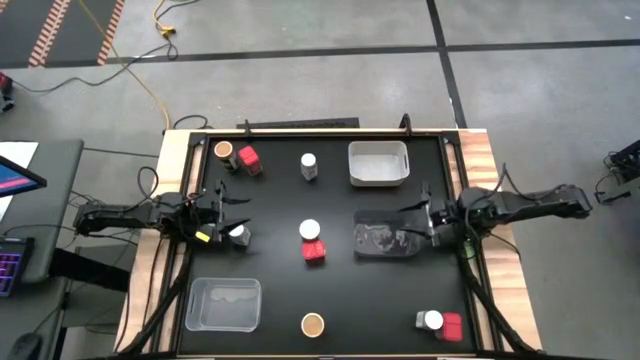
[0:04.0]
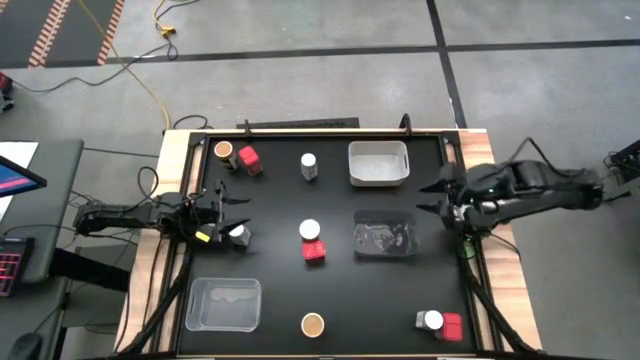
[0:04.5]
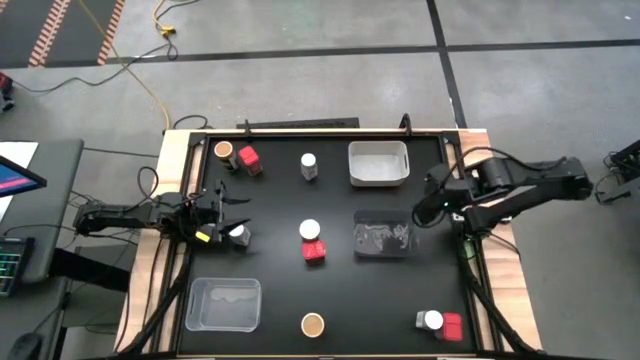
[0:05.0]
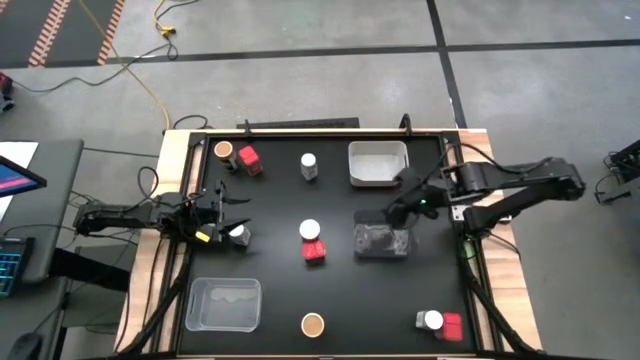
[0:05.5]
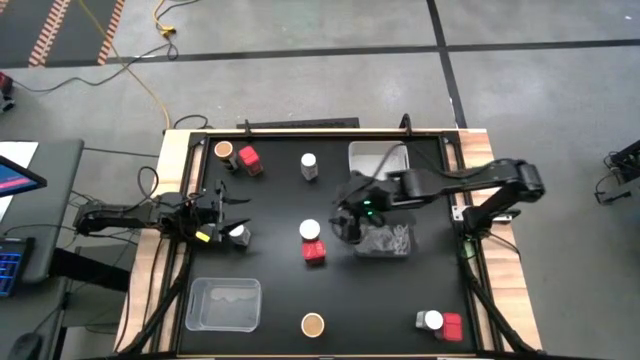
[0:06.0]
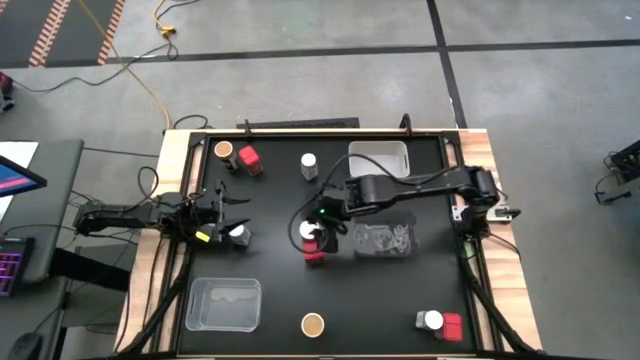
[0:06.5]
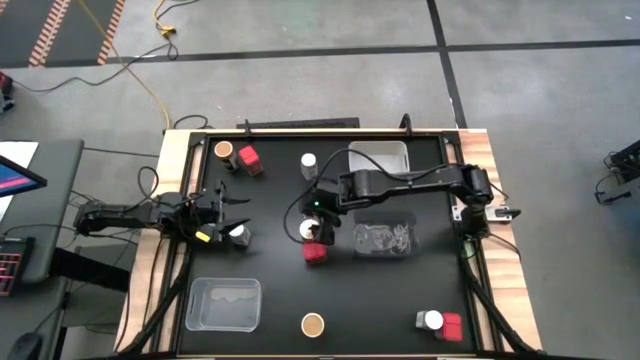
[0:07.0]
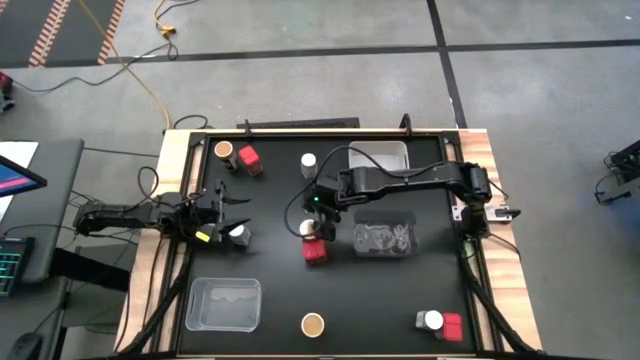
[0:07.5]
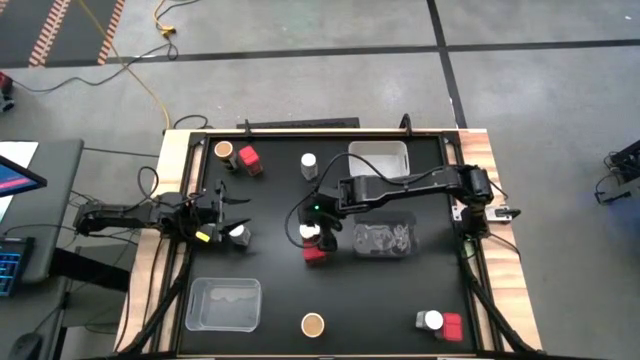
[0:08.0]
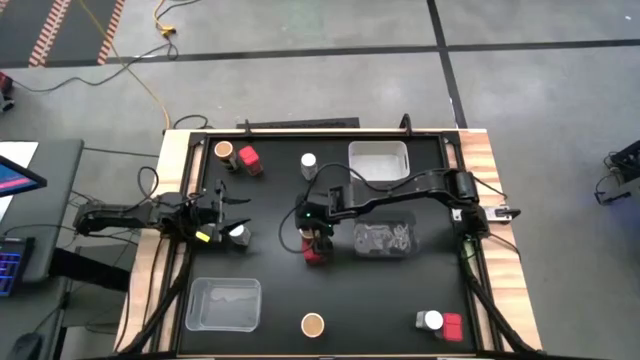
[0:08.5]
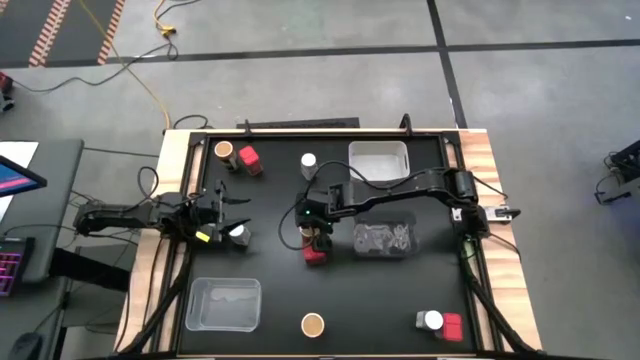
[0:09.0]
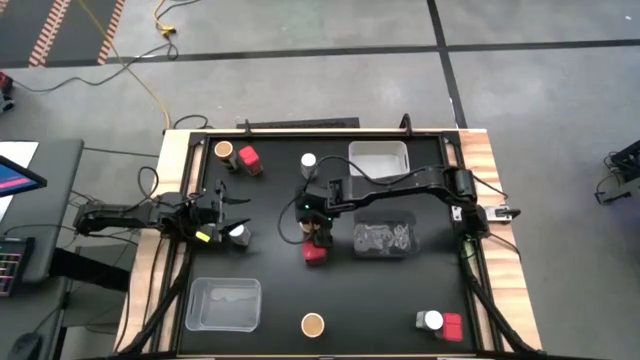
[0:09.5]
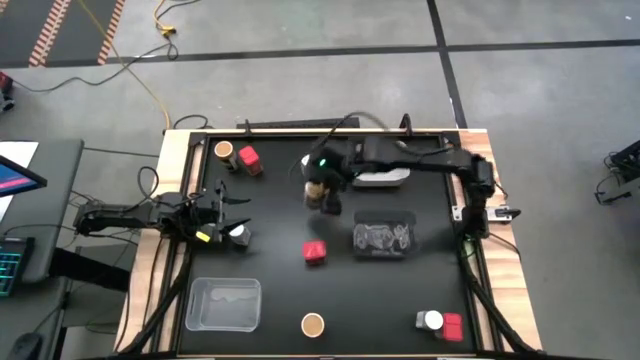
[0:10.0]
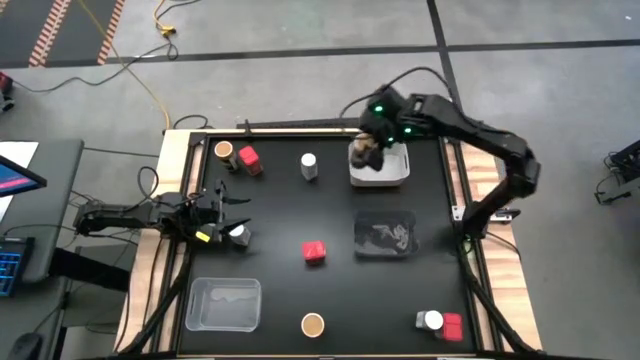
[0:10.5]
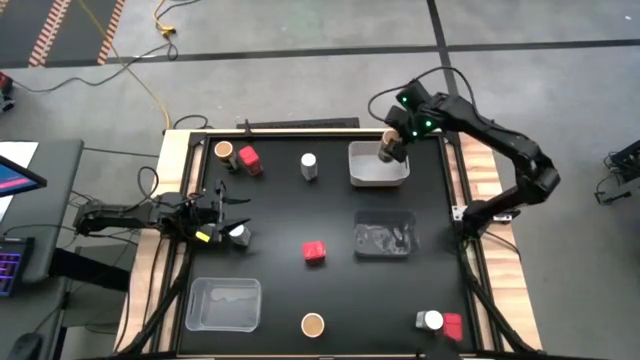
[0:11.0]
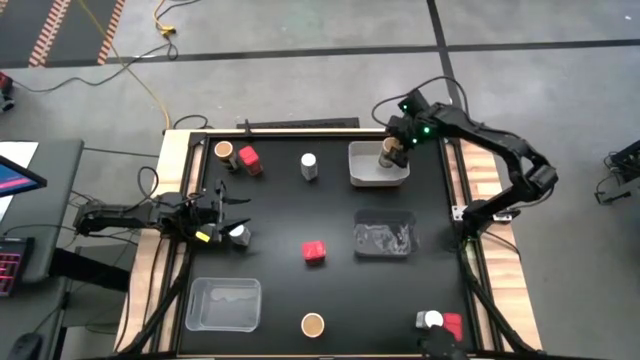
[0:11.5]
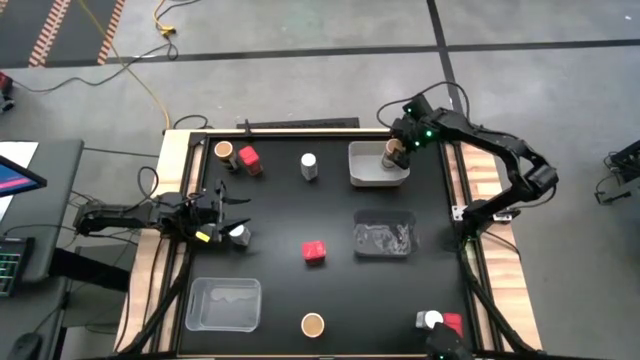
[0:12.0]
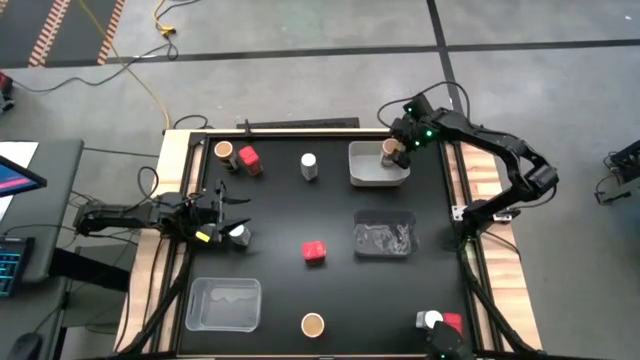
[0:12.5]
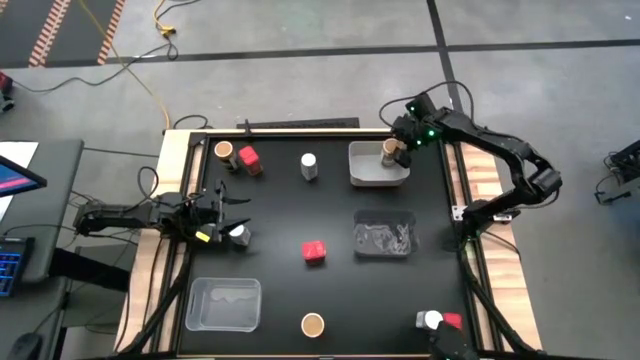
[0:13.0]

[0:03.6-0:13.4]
Task: Sort spices by type
Put the center gold spice bottle in the gray bin

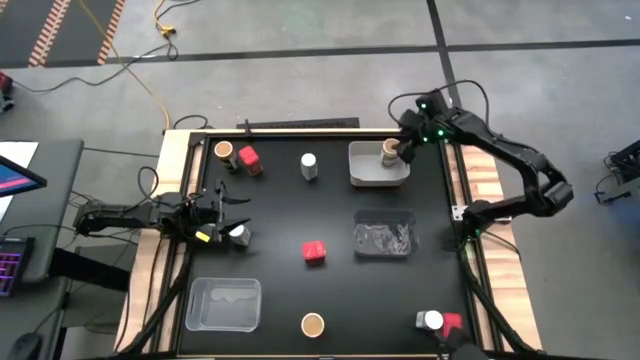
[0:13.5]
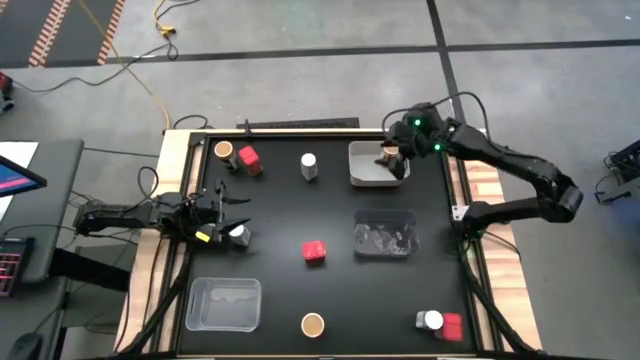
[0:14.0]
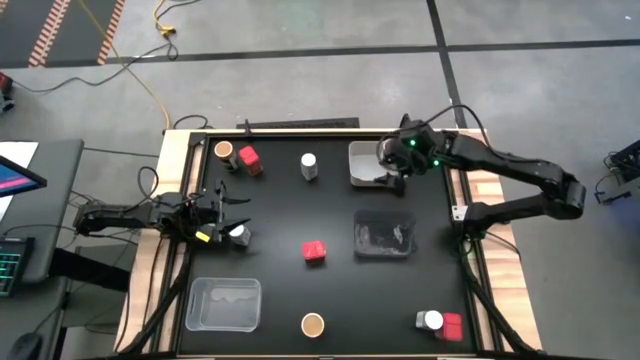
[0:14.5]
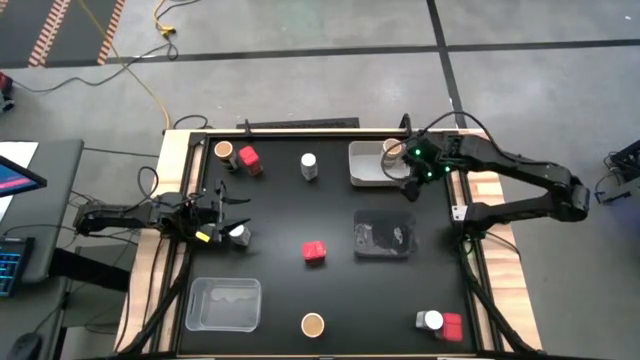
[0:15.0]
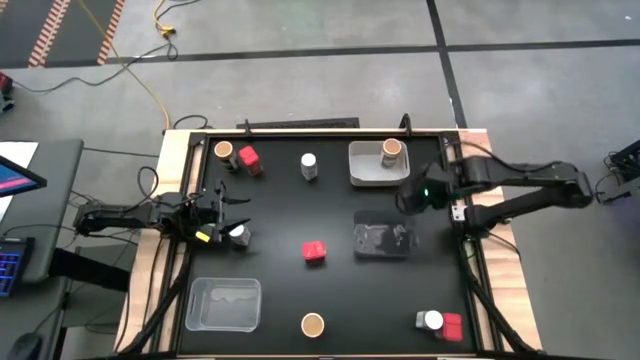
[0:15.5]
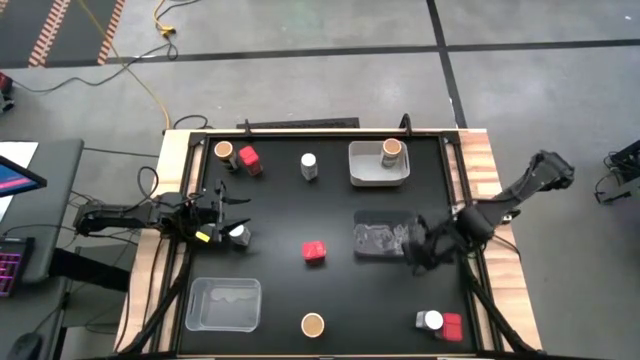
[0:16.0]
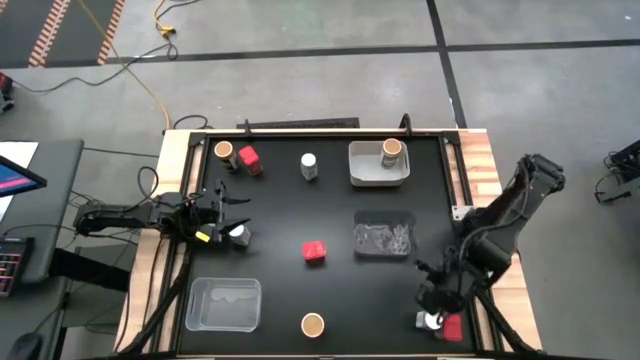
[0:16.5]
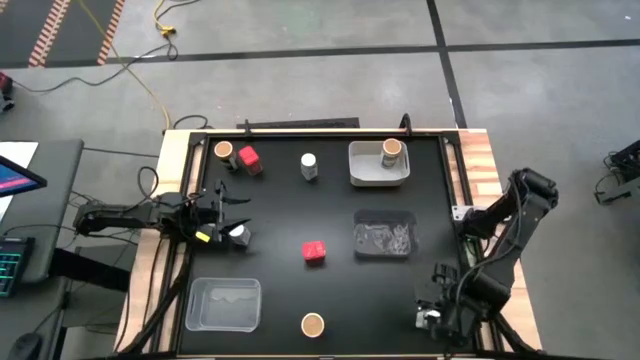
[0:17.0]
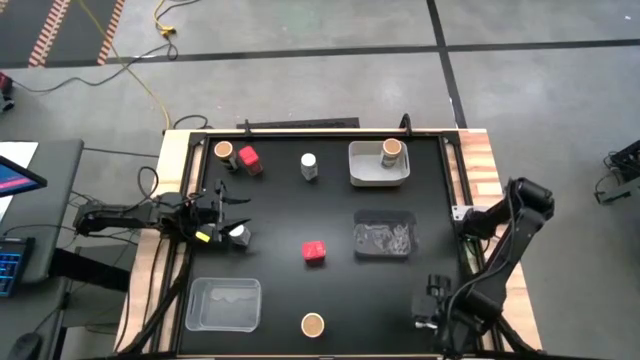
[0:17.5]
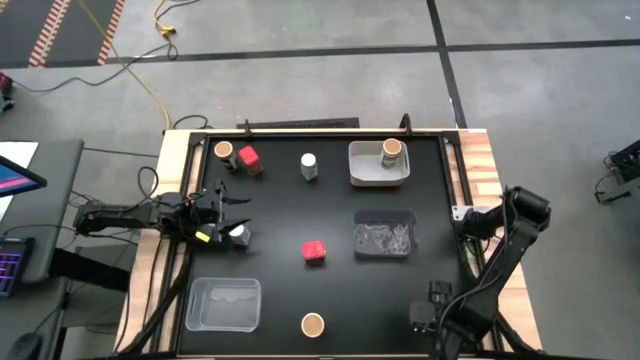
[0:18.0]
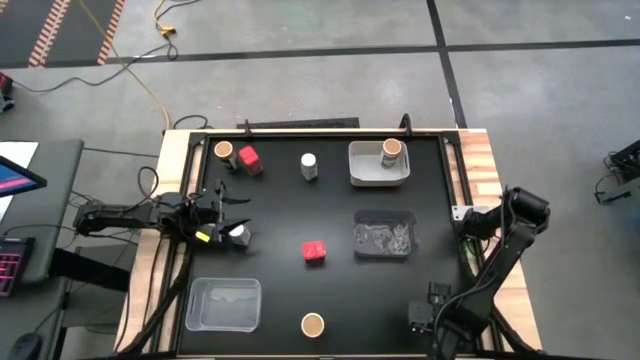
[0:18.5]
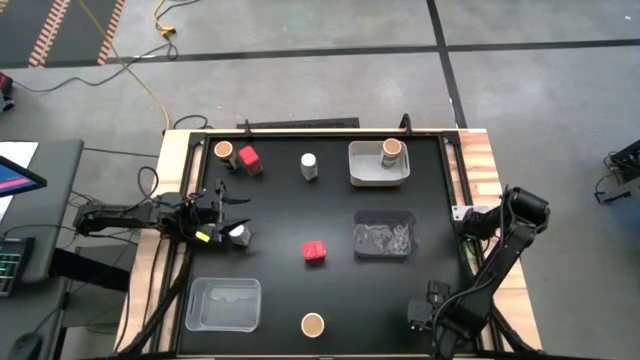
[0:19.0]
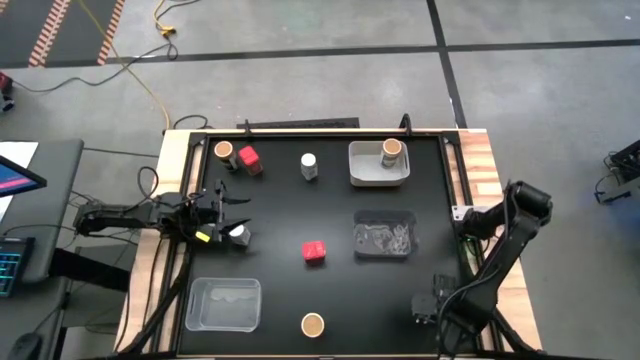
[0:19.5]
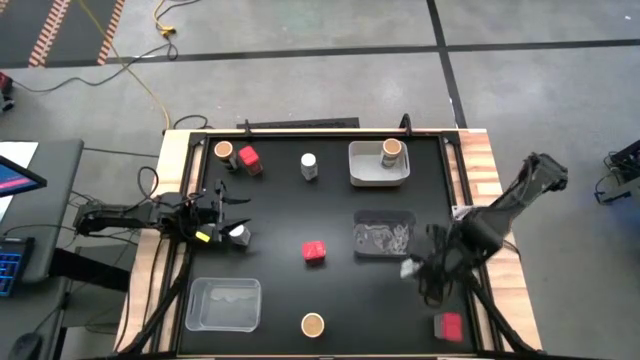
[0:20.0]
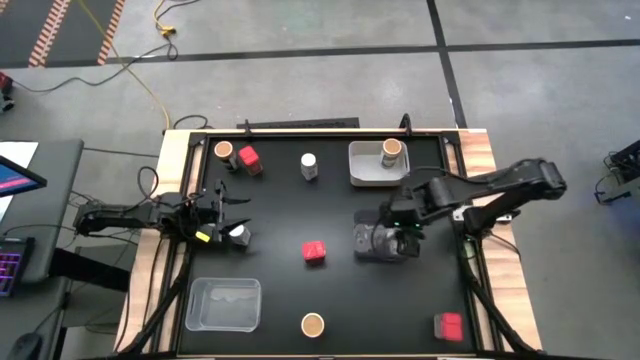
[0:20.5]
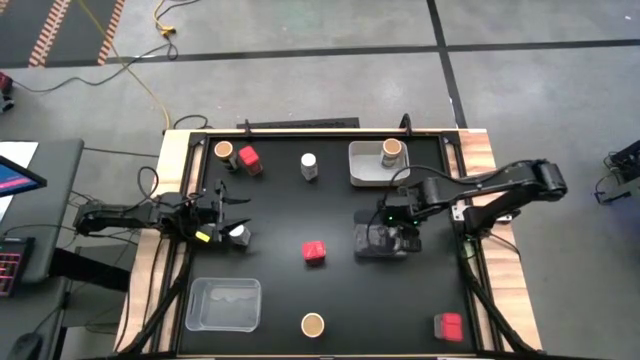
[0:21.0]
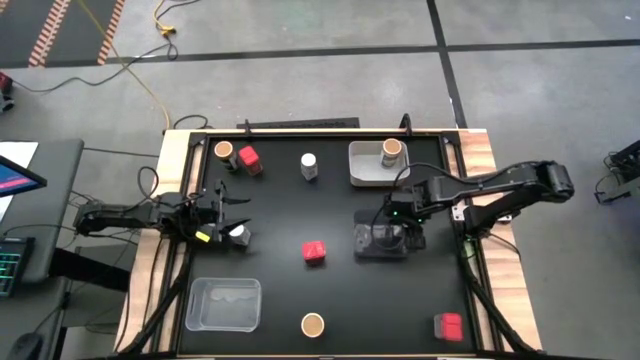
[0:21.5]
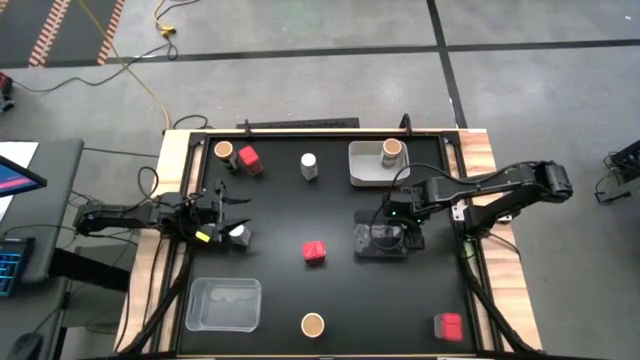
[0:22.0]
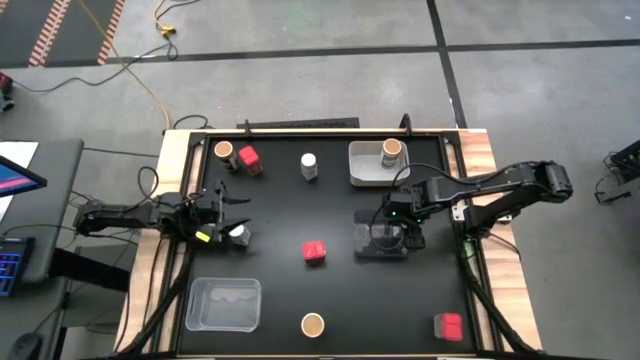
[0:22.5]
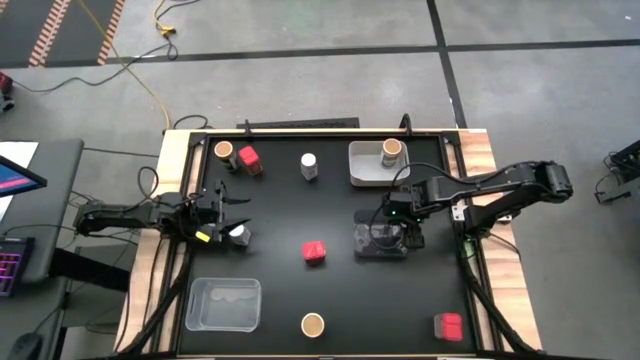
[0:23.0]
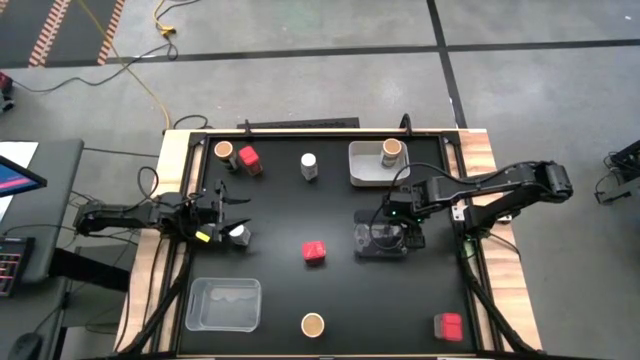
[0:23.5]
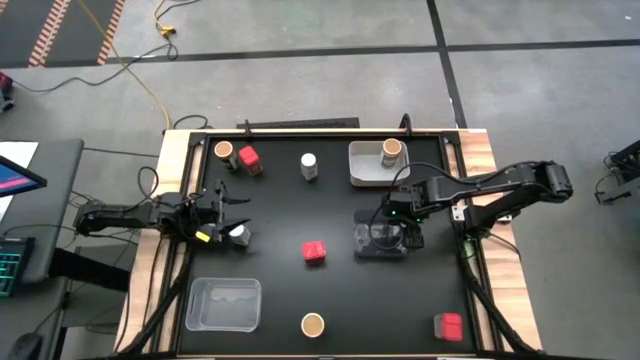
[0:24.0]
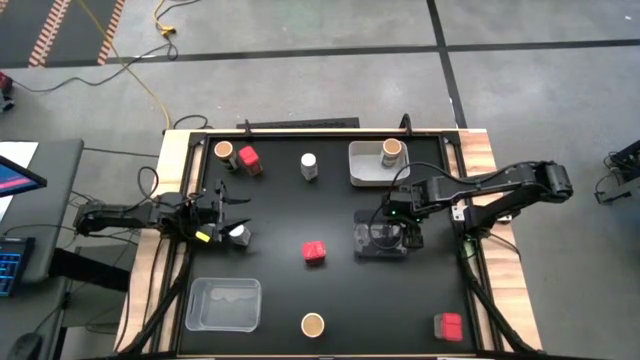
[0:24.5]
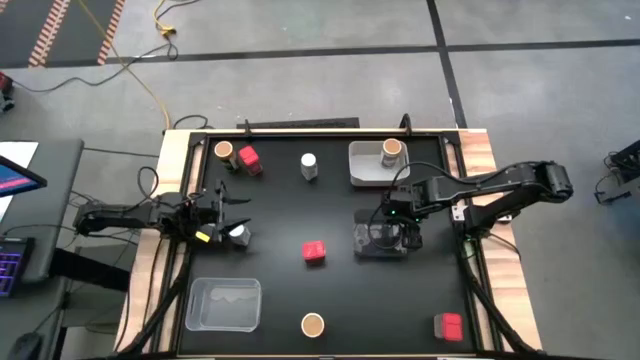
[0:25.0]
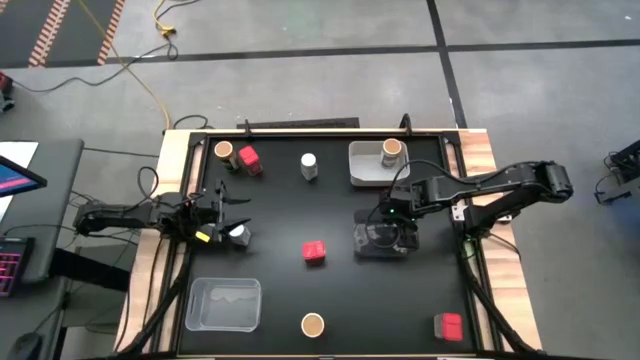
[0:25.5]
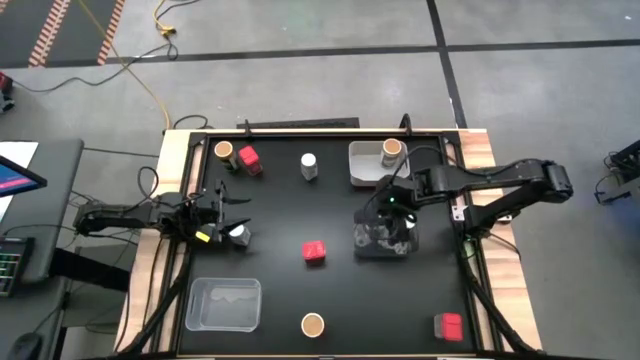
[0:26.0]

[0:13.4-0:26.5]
Put the bottom right white spice bottle in the black bin
